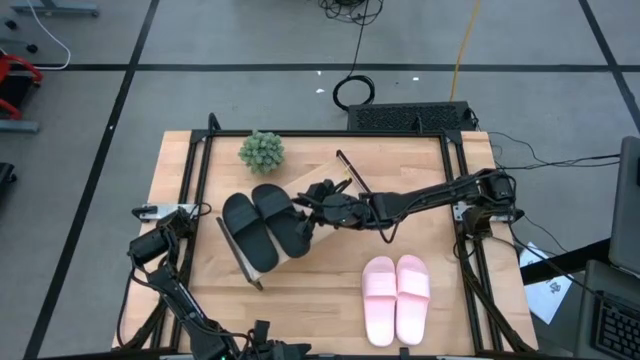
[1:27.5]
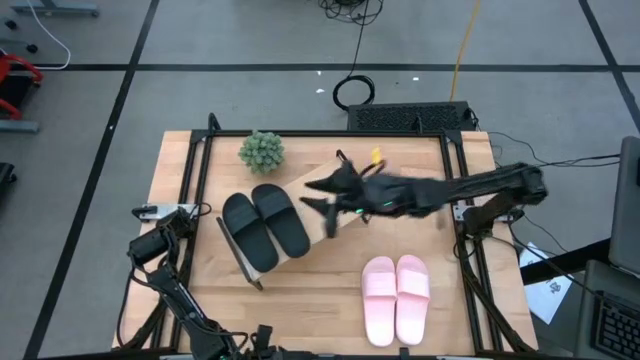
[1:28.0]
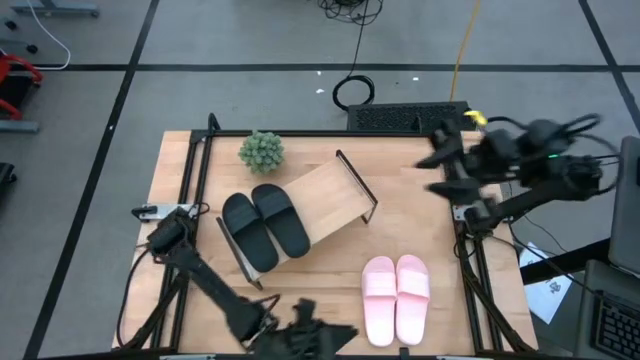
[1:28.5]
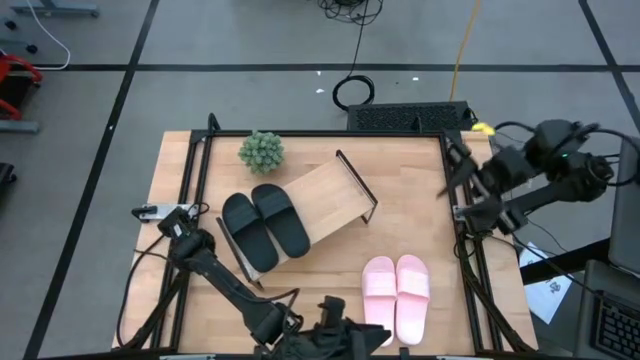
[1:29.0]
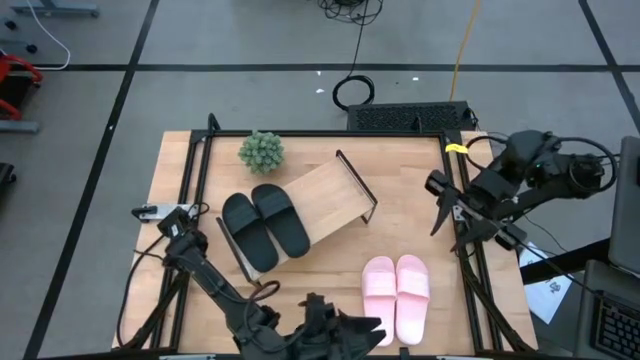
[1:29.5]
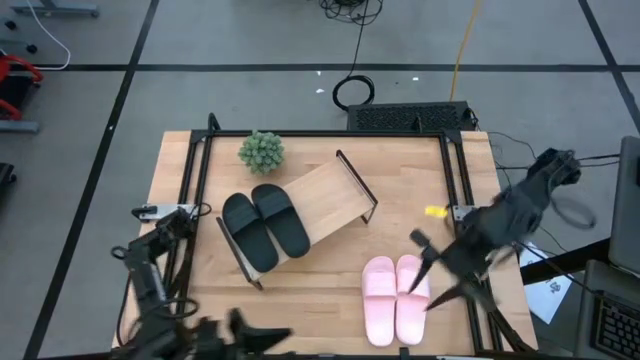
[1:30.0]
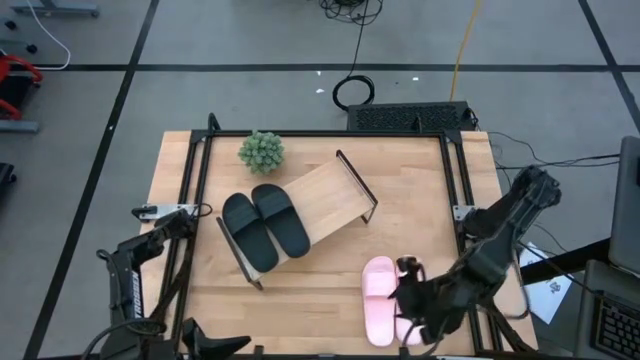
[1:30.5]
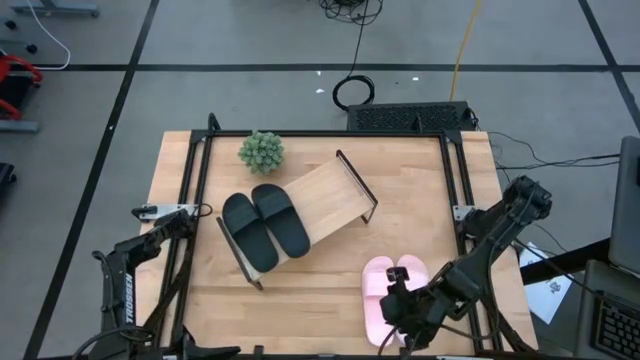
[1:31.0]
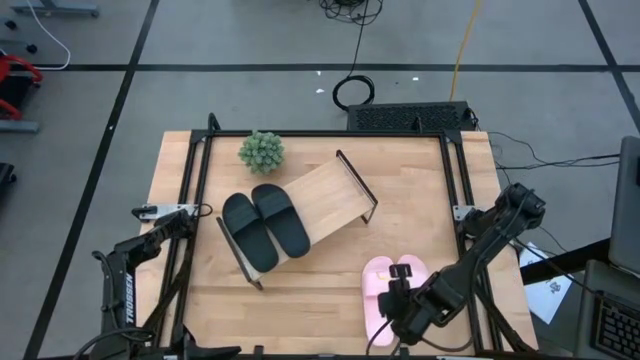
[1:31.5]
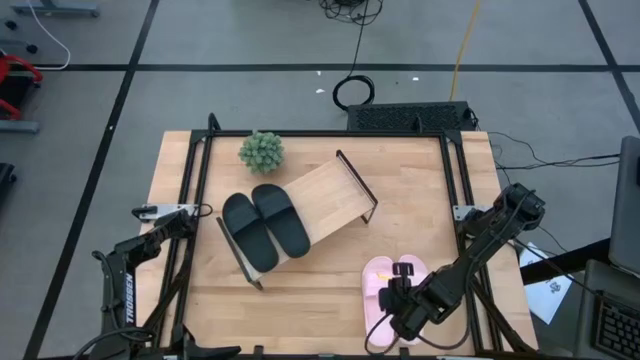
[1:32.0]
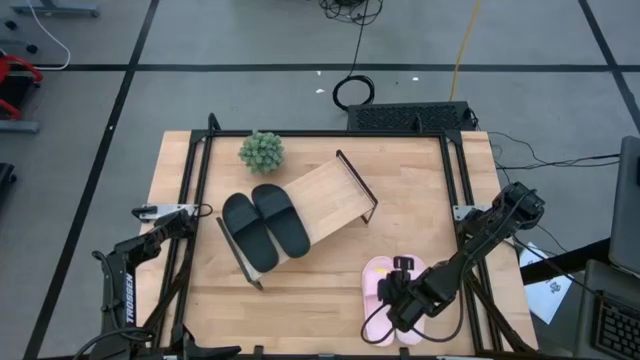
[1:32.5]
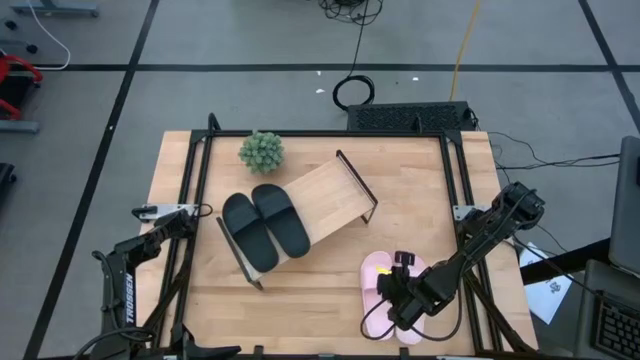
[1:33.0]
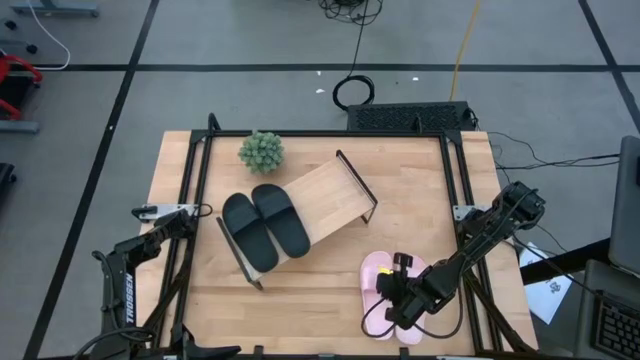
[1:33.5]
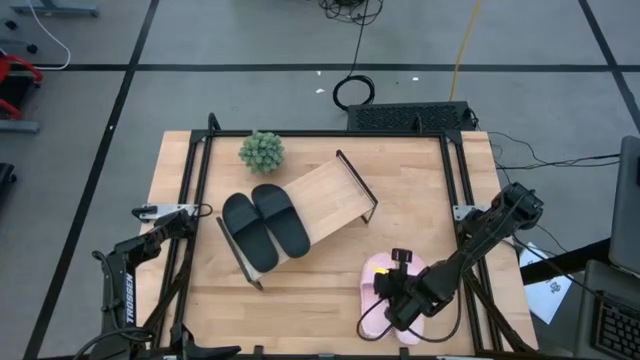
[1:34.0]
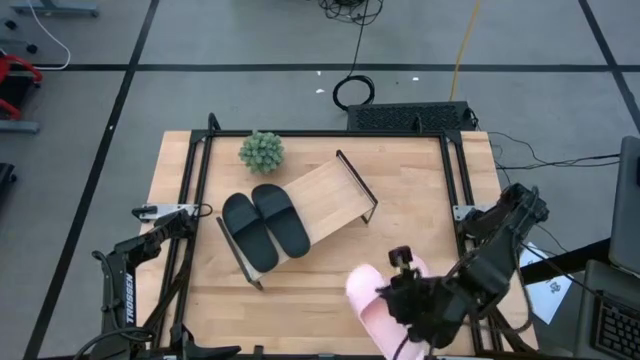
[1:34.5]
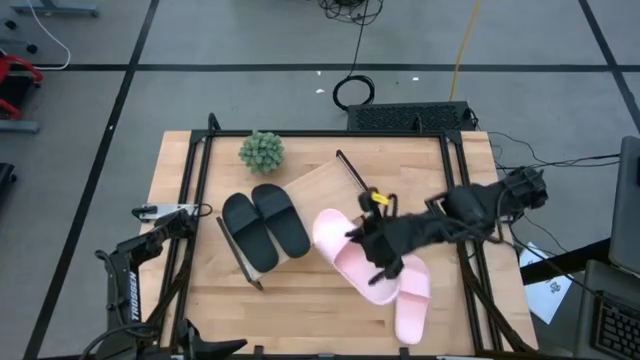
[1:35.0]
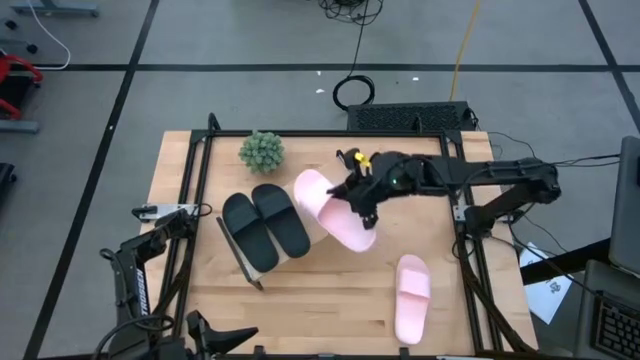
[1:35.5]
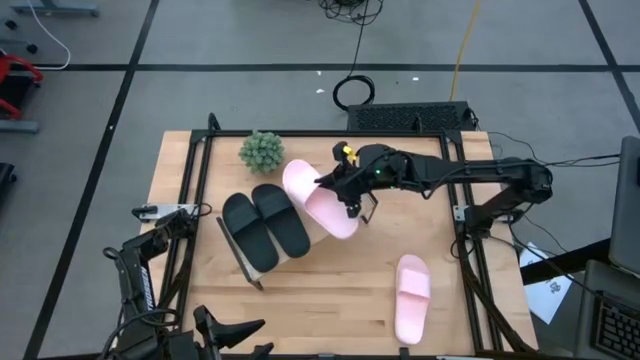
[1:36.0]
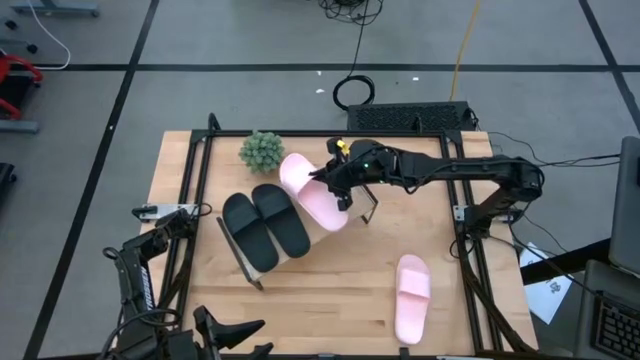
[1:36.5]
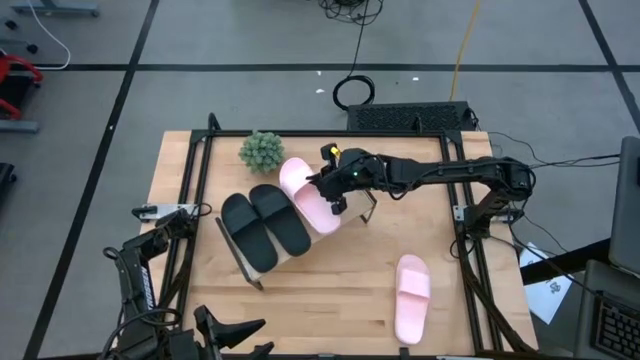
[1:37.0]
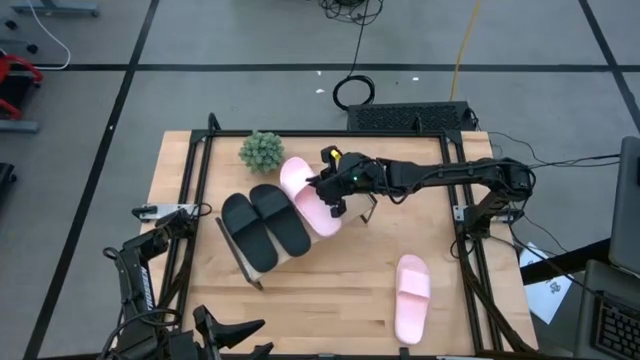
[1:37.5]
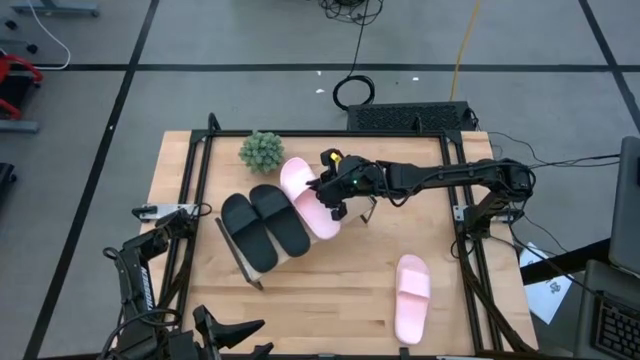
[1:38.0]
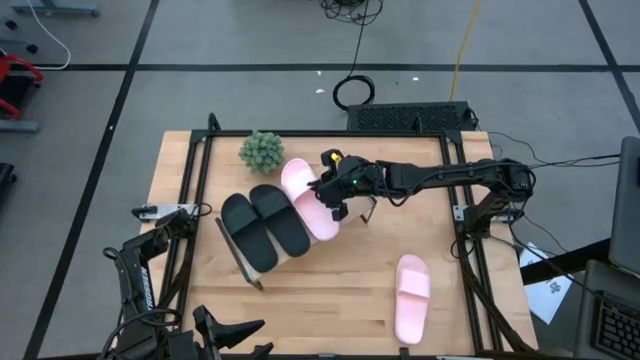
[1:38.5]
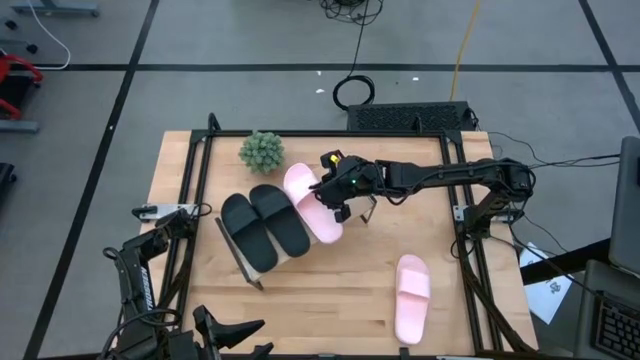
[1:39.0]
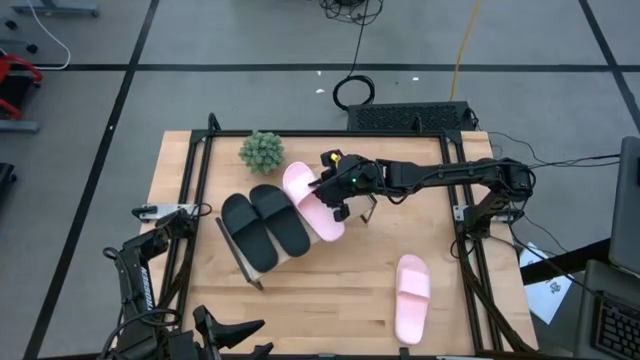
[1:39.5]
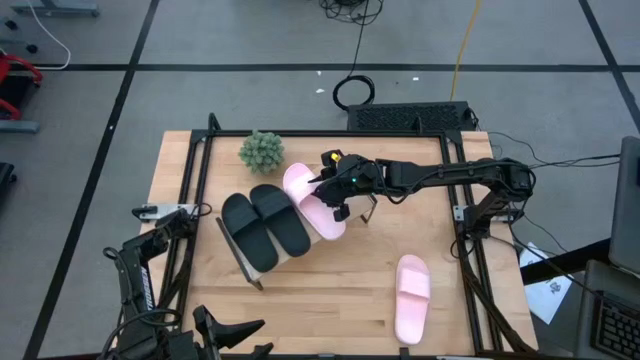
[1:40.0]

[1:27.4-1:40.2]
Task: Pick and place slides into the shelf
Put the left pink slide on the shelf

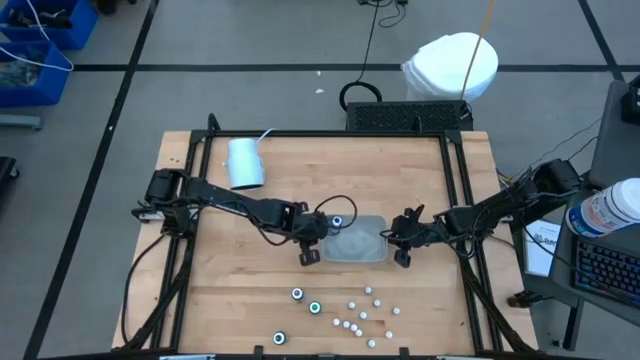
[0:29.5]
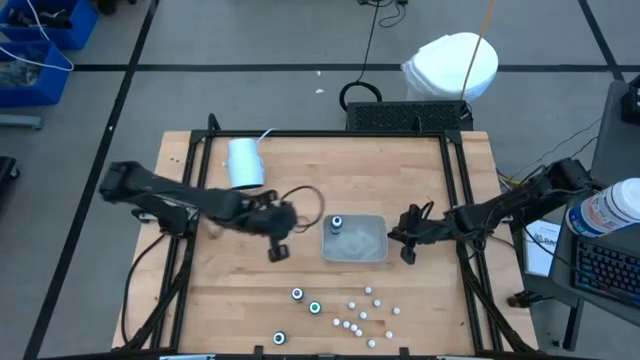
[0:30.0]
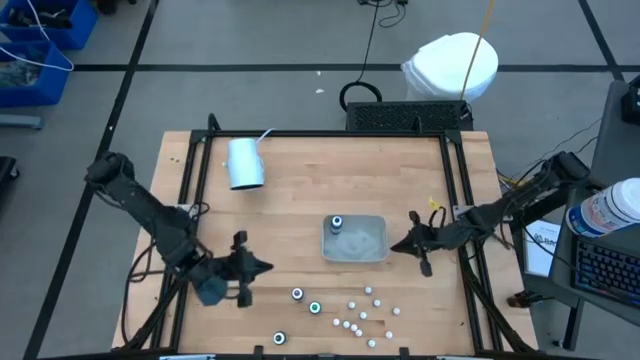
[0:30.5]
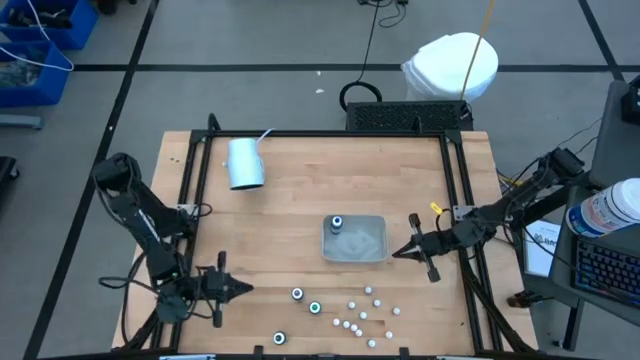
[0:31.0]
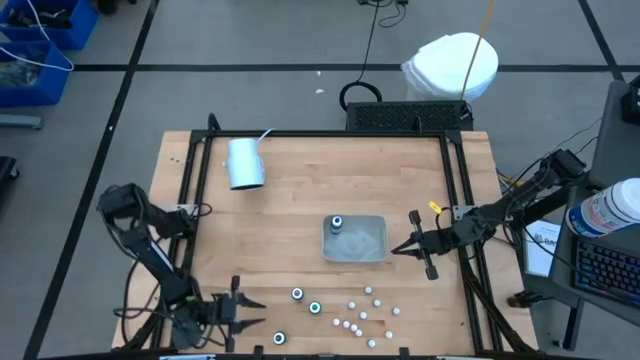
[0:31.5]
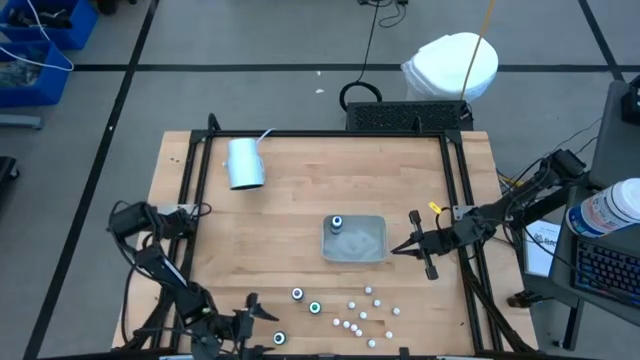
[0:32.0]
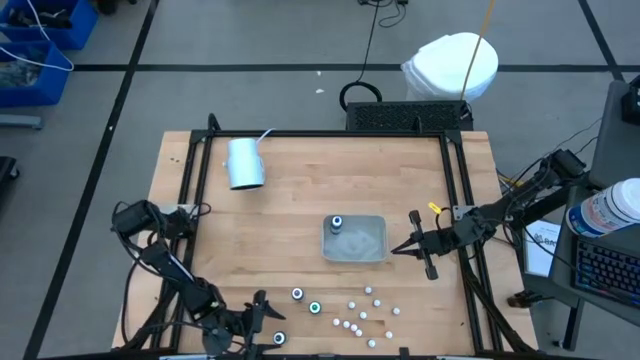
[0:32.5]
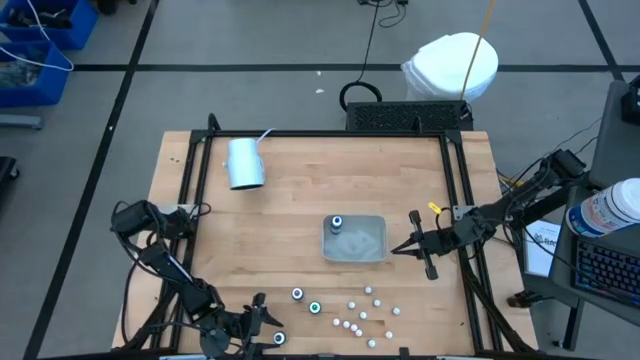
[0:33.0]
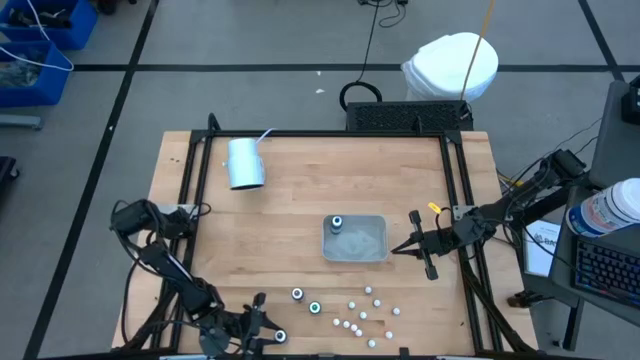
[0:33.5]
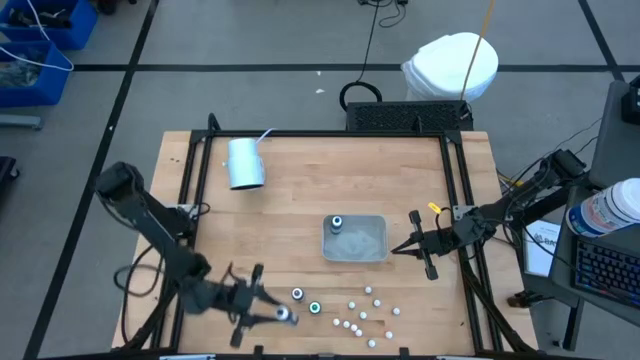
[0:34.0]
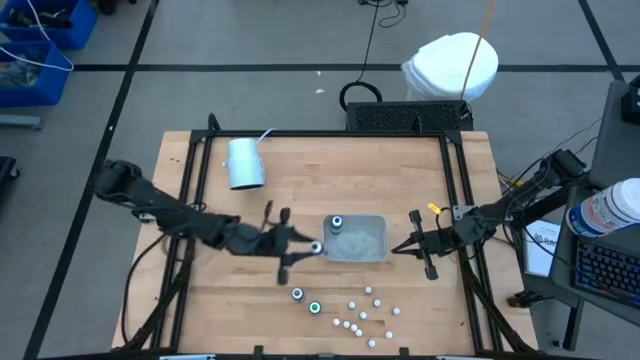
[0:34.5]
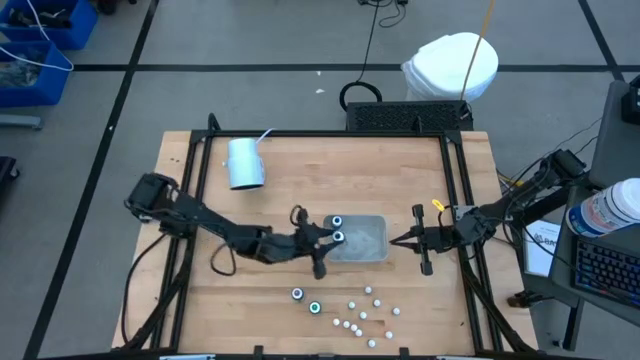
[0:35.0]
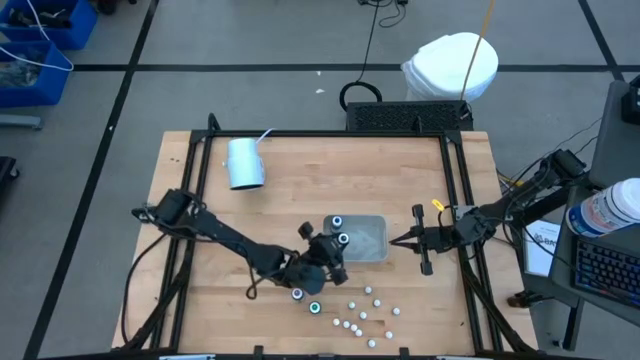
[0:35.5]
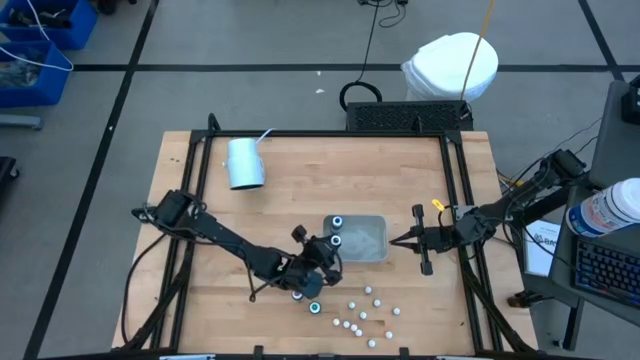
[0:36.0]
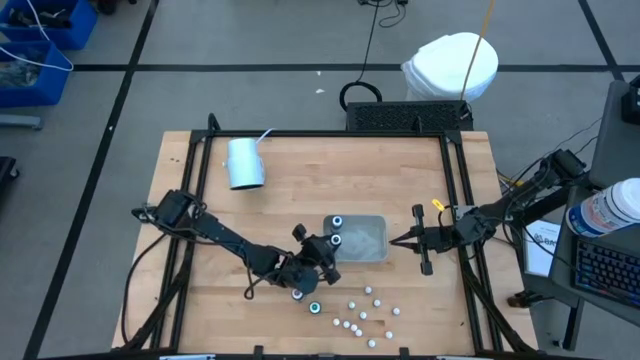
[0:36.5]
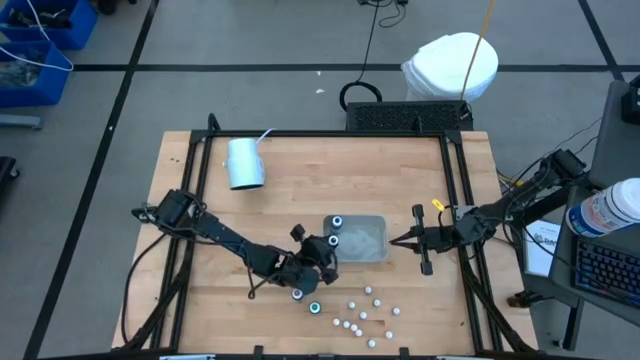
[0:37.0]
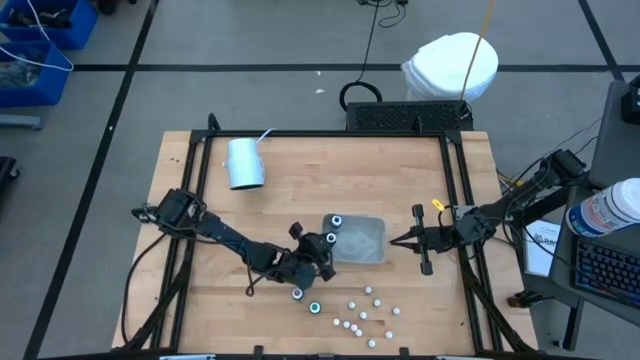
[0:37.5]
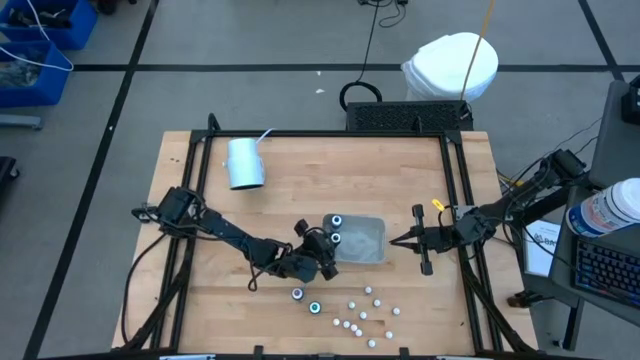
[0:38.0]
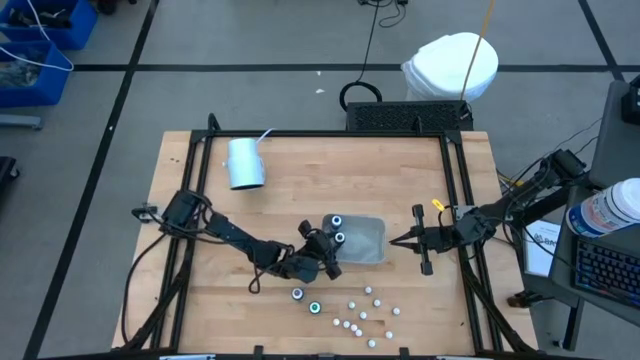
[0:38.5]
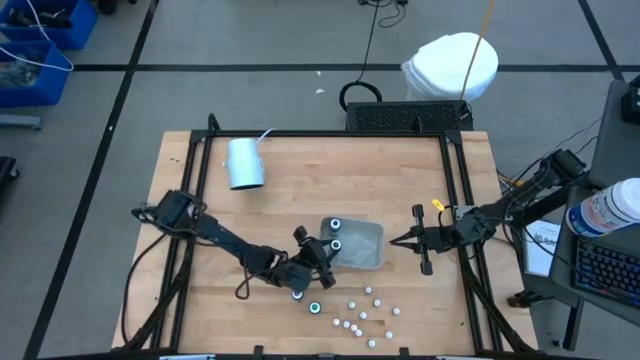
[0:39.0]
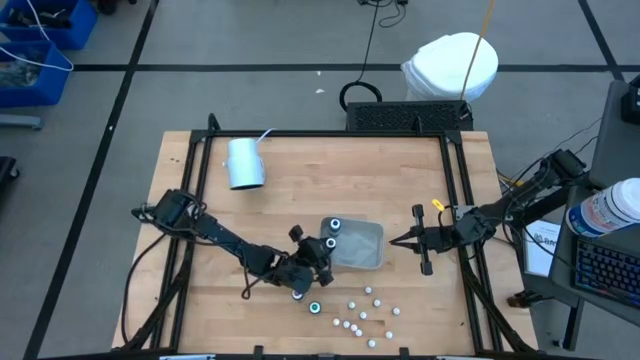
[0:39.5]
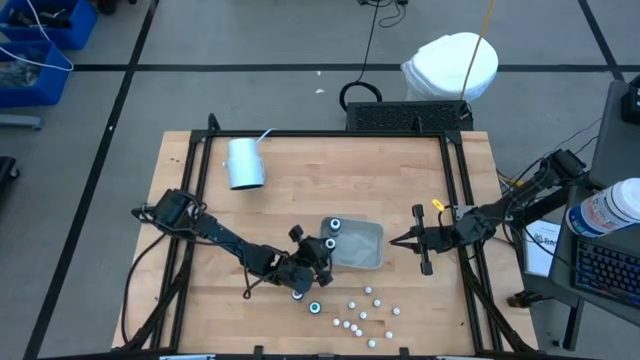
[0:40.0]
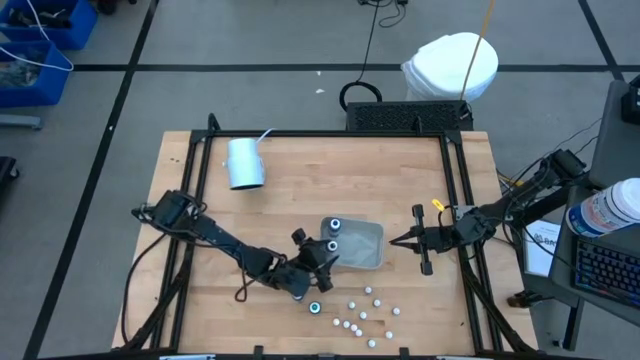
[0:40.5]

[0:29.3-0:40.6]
Task: Pick & Place food coloring
Put the black food coloring bottle into the gray bin
